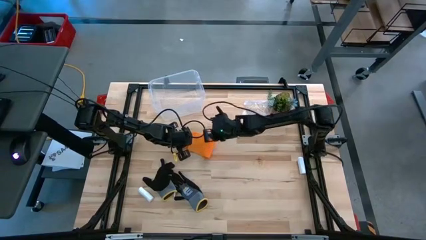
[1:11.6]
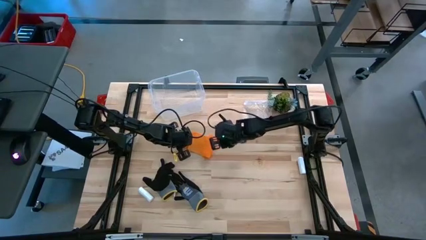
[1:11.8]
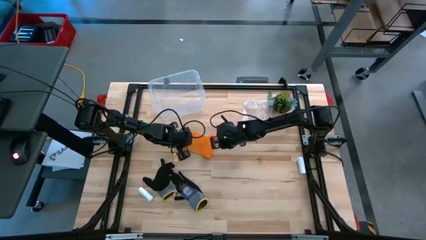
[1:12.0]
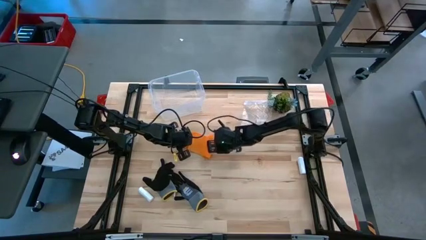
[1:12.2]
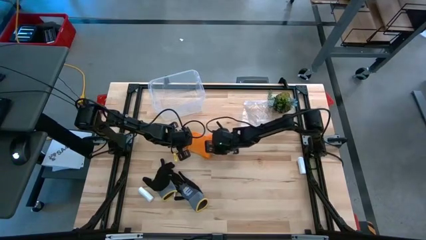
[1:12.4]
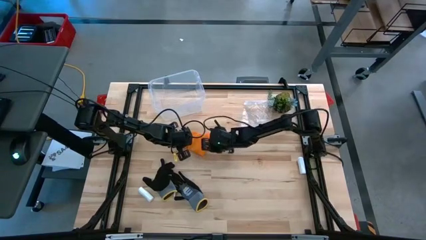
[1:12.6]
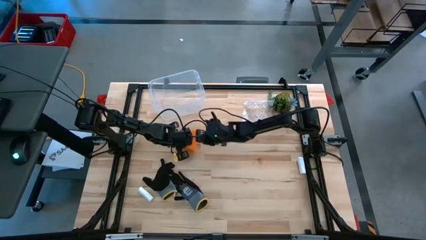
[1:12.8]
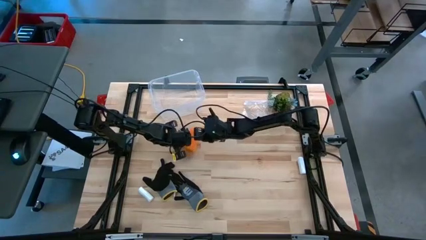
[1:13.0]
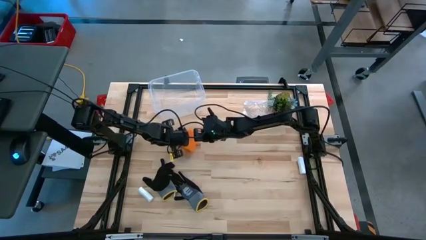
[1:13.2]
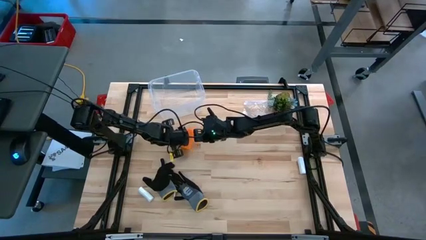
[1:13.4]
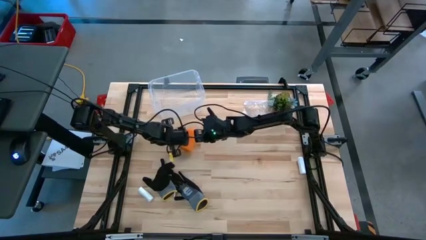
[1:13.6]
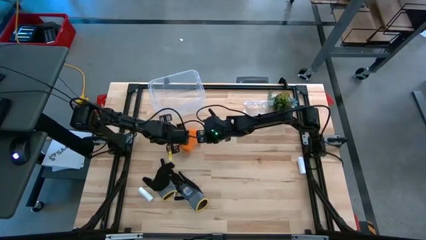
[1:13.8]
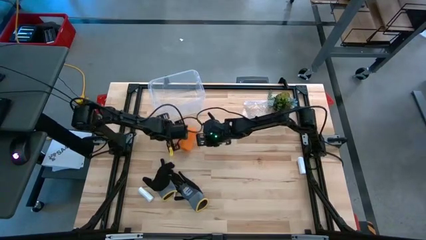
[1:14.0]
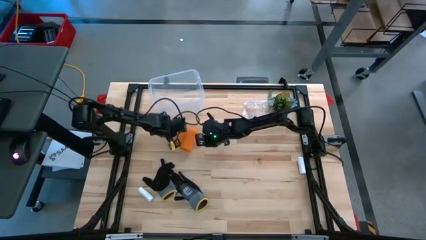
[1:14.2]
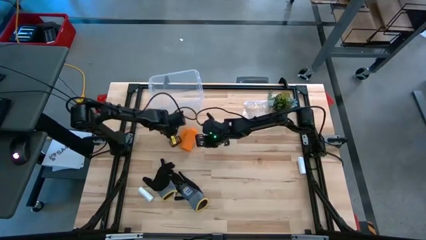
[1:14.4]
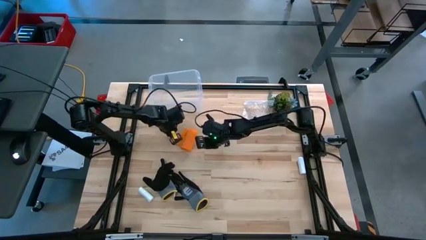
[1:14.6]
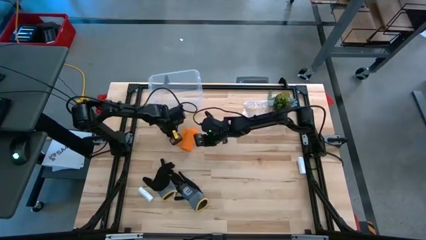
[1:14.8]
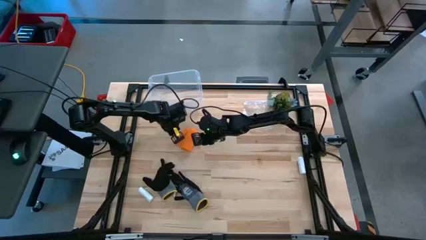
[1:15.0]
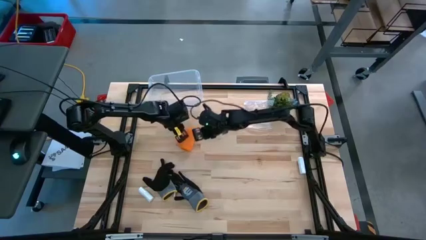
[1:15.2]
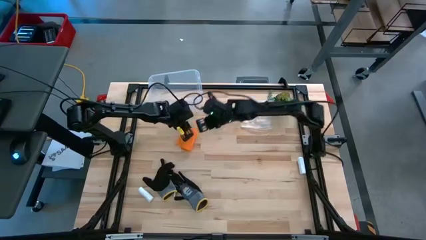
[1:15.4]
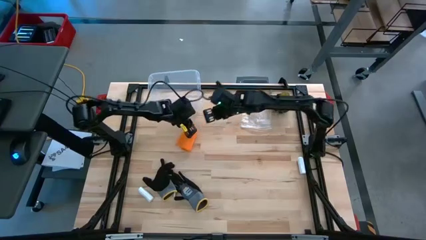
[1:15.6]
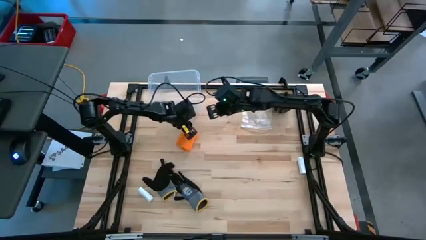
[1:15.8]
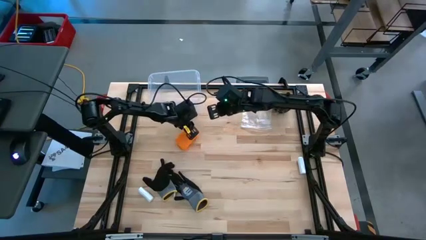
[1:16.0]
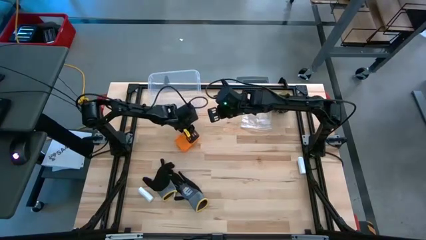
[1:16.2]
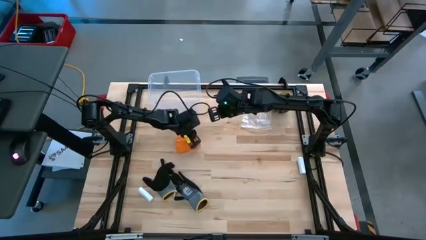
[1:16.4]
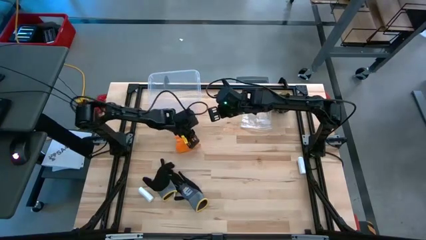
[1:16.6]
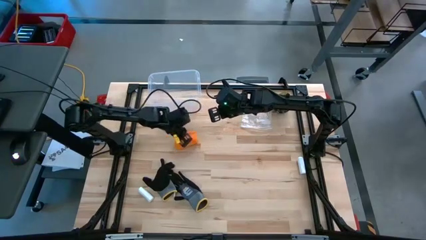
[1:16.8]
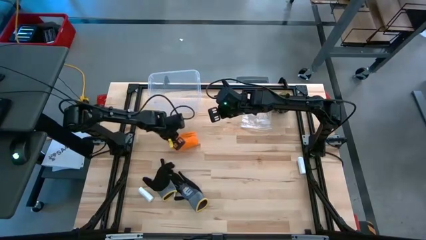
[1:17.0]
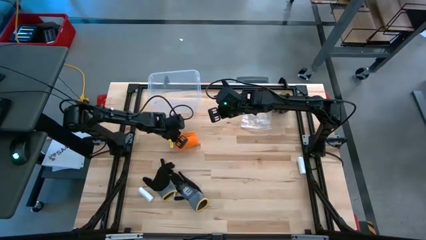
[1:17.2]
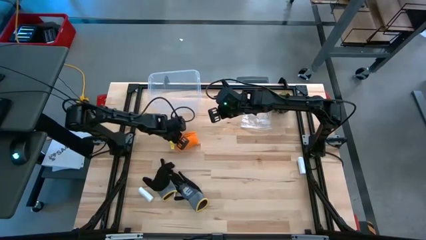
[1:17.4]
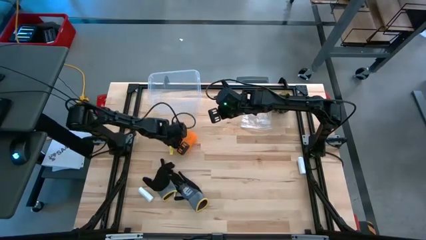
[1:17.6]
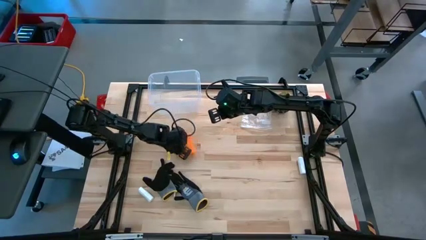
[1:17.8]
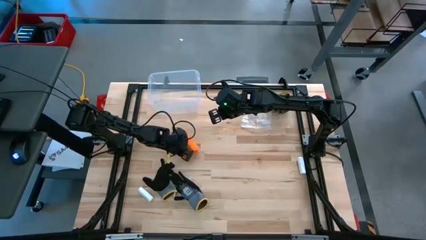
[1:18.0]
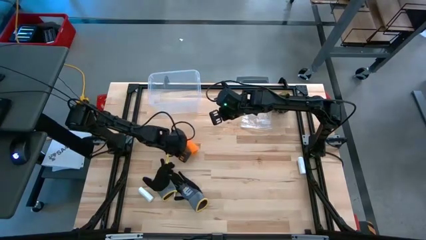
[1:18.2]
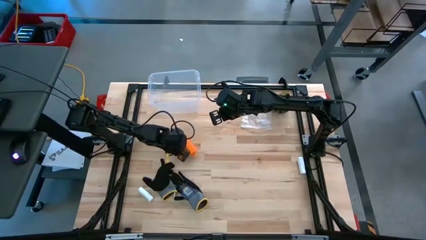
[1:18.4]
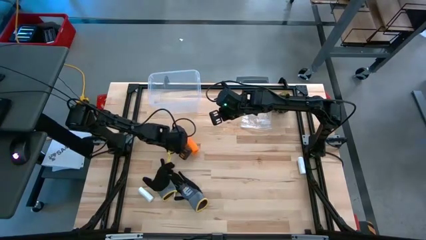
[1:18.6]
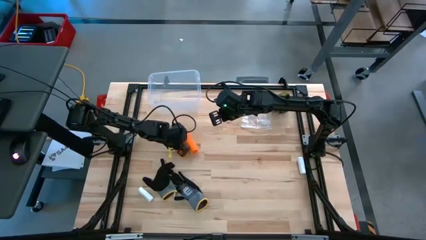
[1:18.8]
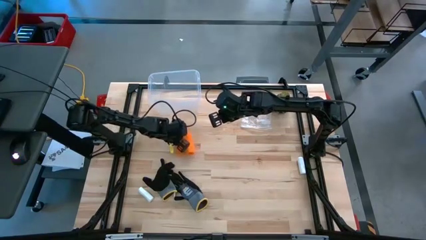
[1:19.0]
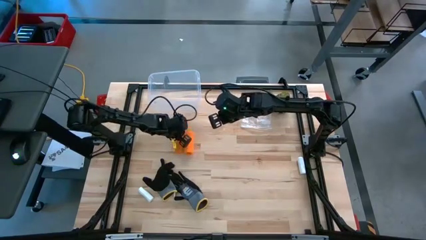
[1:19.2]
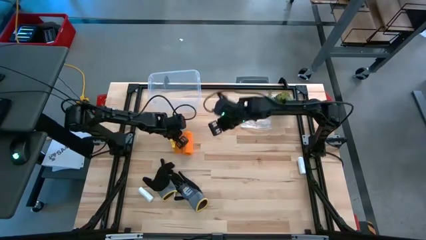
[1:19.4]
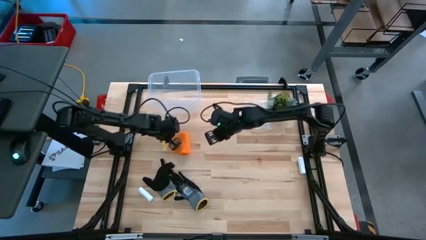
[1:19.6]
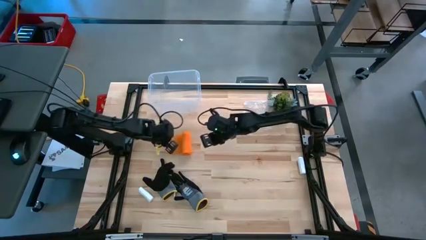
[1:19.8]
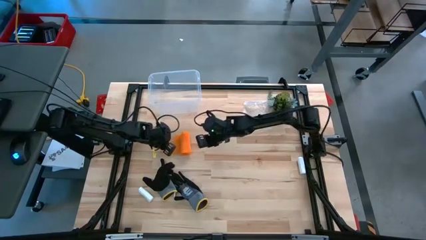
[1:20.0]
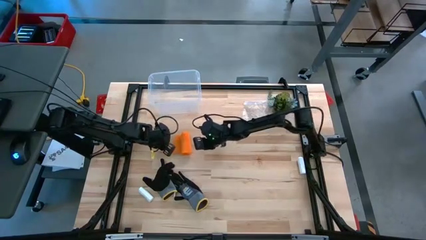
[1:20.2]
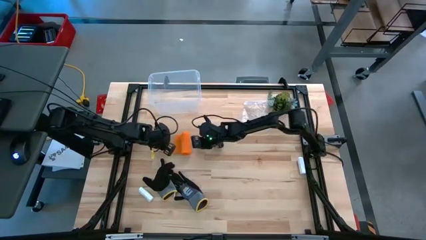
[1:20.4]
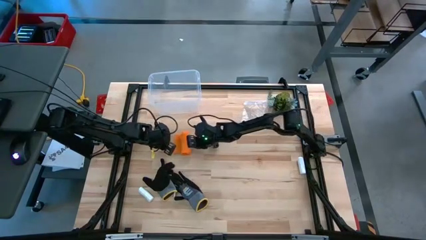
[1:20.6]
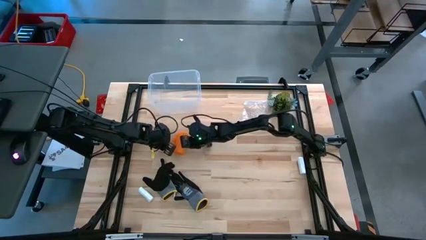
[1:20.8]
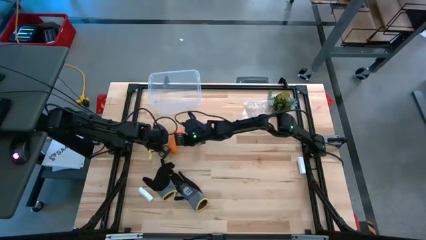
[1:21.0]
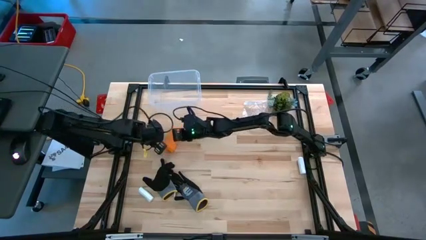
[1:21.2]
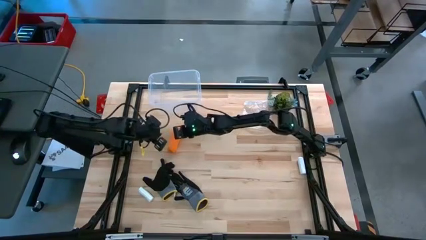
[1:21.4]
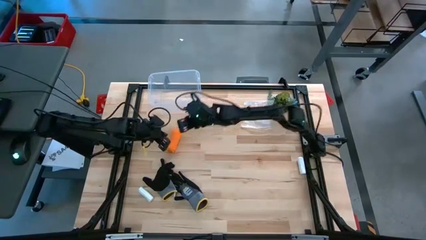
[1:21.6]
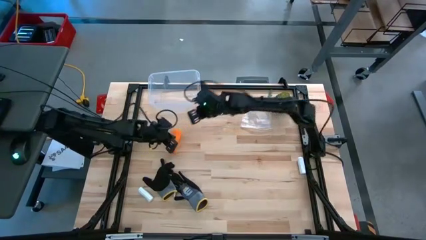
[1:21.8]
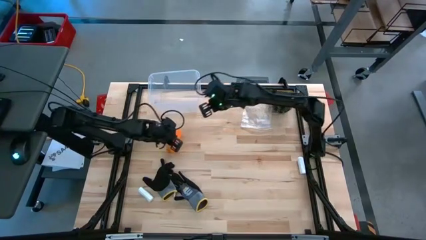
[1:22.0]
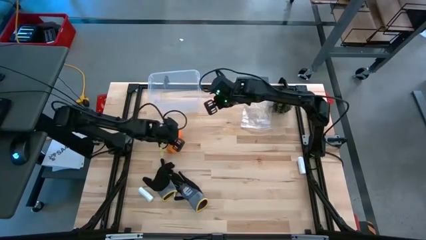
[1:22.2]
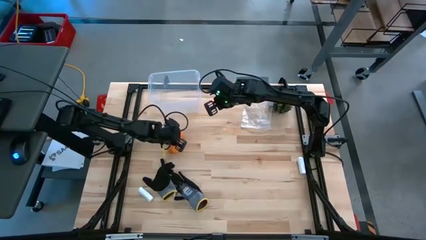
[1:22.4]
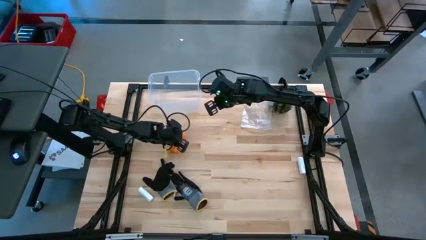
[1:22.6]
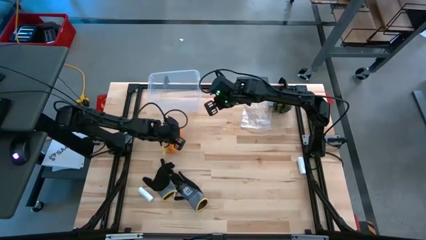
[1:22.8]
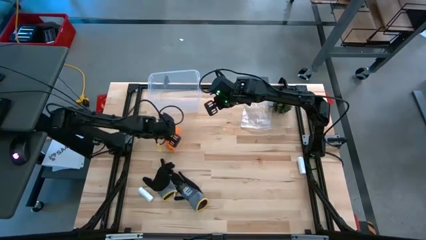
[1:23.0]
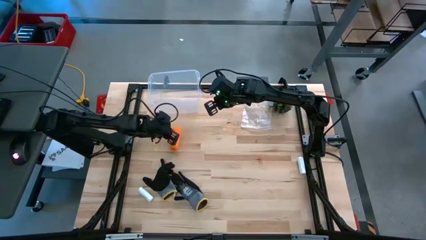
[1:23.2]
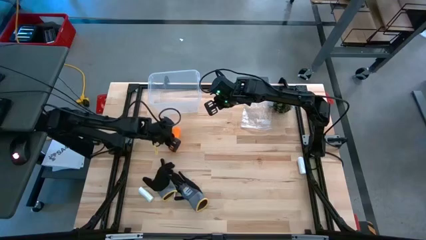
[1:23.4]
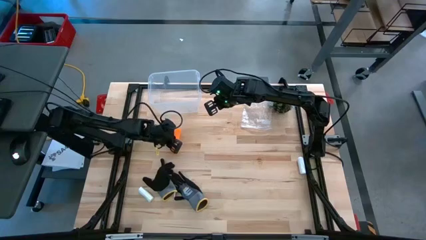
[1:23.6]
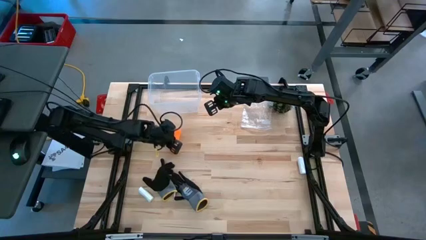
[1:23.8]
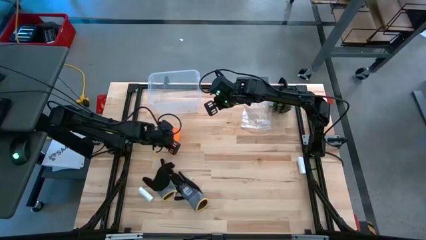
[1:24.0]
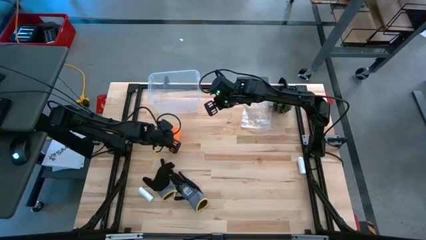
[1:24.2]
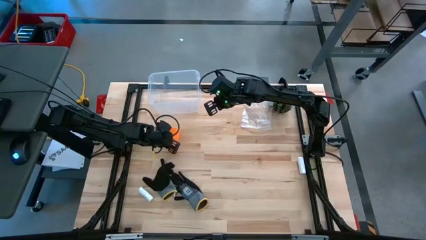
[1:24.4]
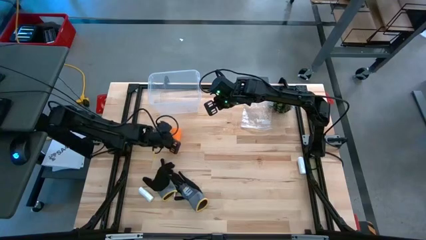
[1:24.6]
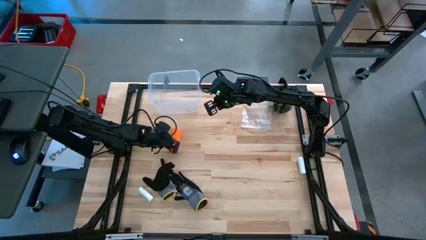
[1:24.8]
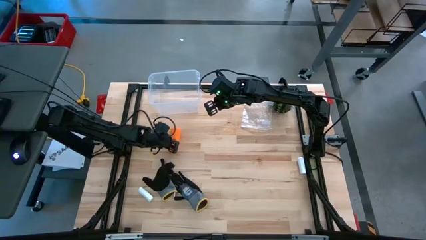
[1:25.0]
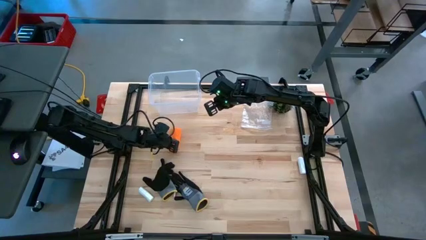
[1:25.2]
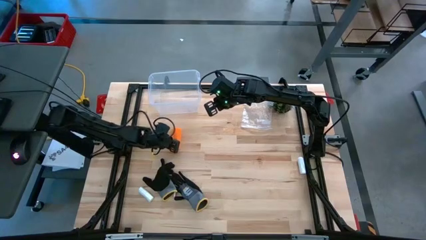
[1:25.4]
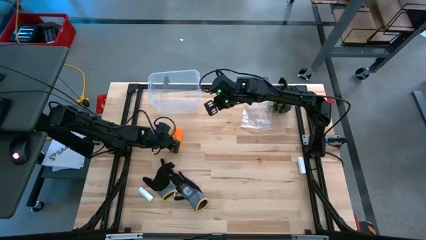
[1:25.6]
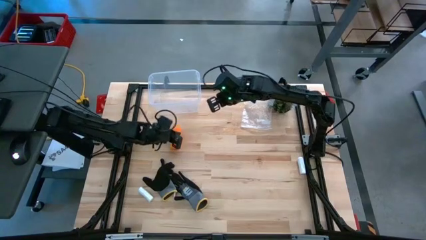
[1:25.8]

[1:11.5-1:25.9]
Task: Roll bandage
Roll the orange bandage

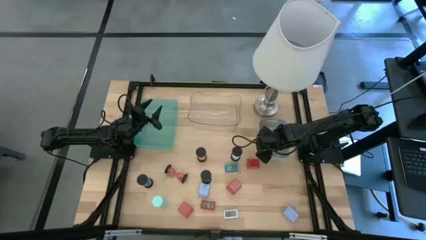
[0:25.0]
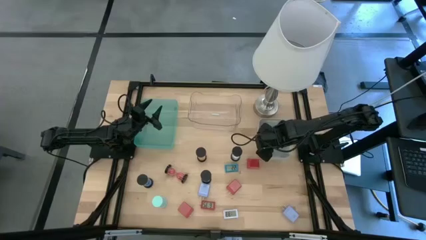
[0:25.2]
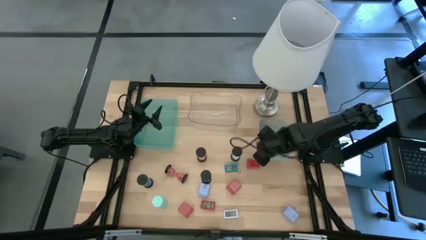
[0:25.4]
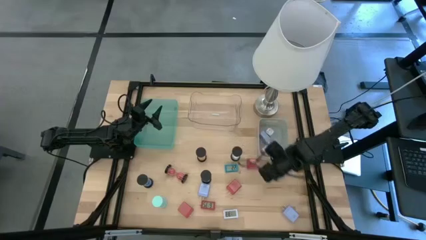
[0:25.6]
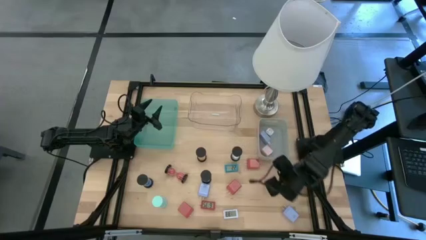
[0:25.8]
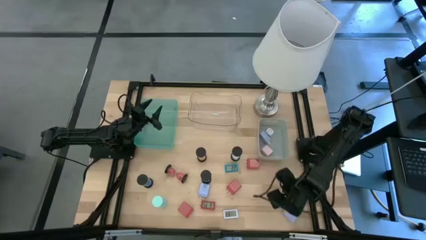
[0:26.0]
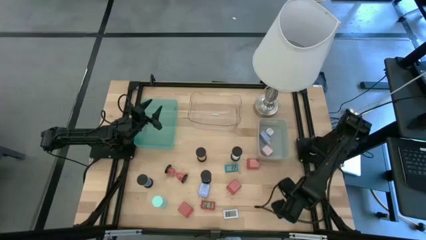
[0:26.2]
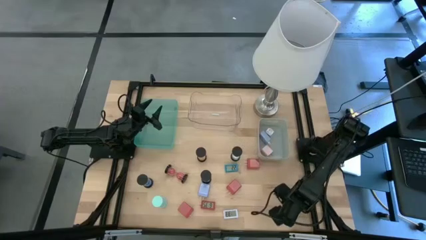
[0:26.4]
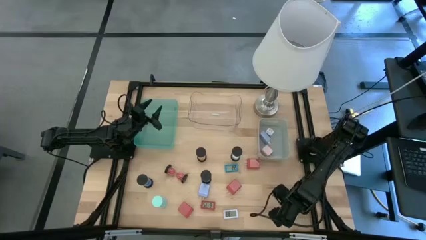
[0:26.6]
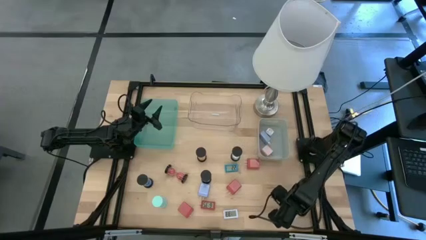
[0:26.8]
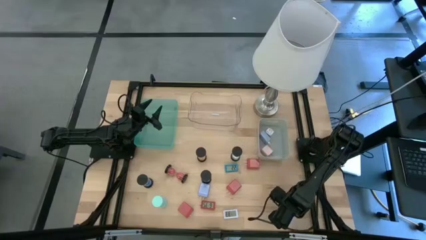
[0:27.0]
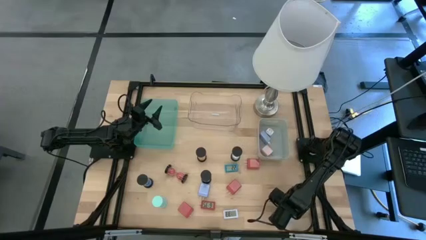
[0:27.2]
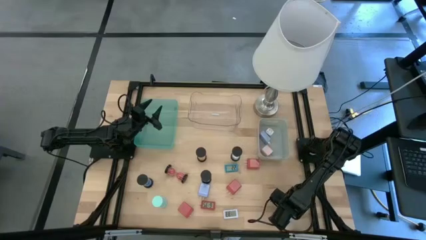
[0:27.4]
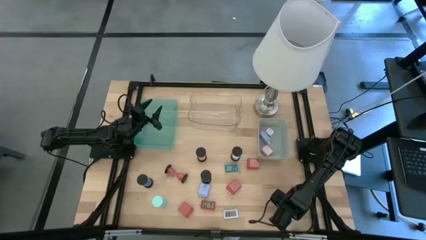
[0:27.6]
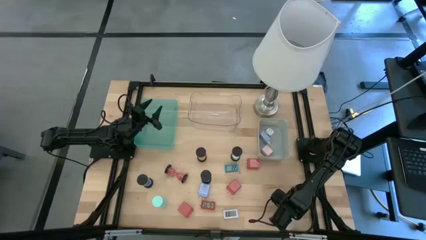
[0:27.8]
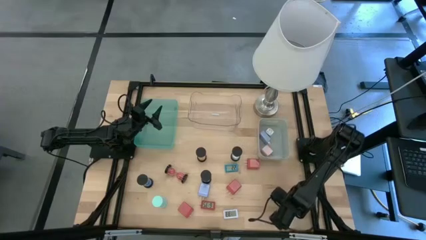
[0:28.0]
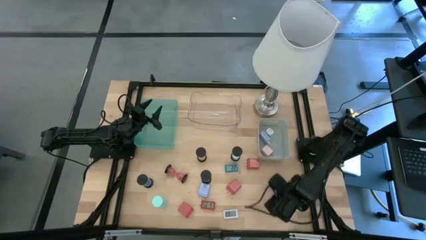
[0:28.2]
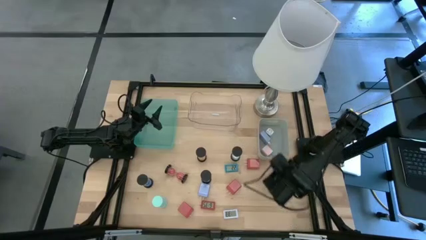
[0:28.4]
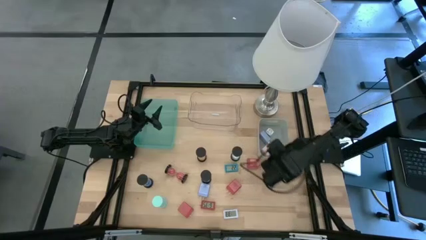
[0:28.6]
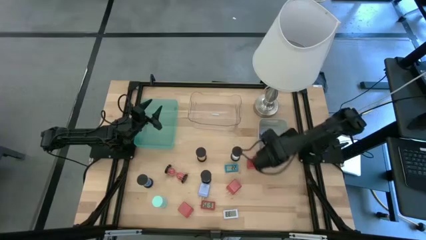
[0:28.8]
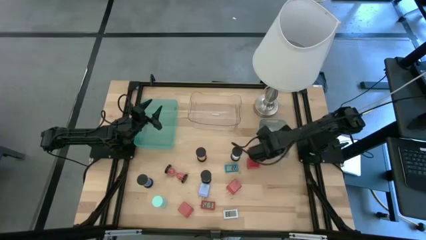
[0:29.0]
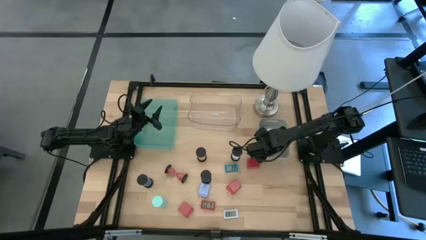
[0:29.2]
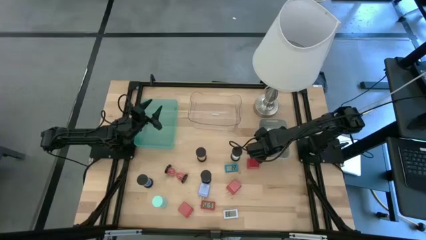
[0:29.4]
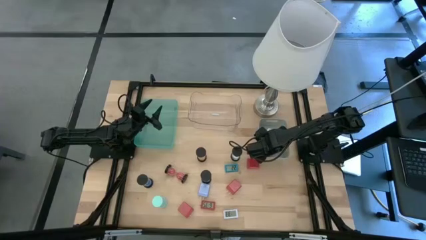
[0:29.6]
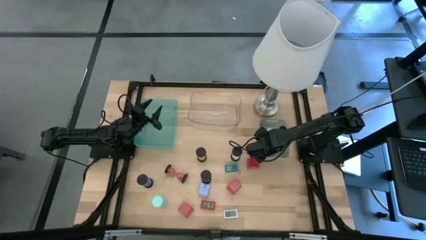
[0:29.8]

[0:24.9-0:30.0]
Task: Pick & Place Office items
Put the right blue charger adapter into the gray bin
